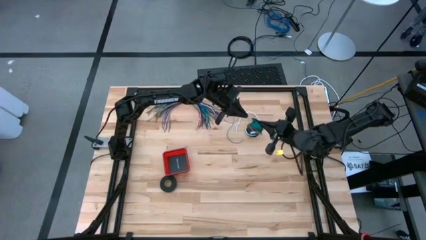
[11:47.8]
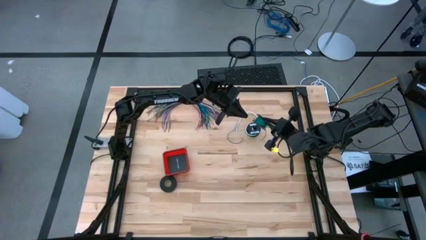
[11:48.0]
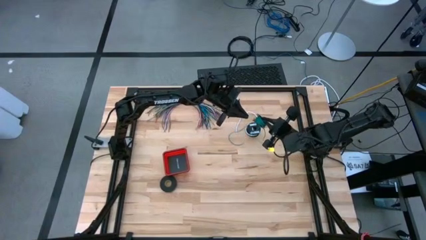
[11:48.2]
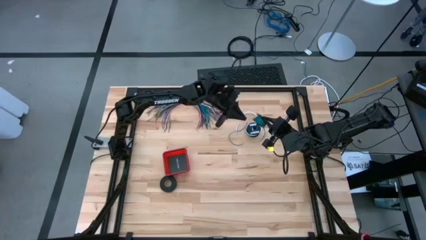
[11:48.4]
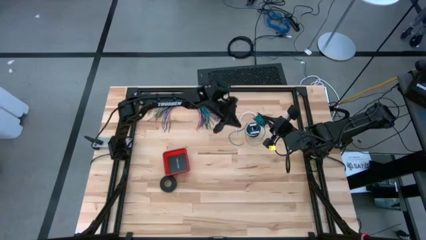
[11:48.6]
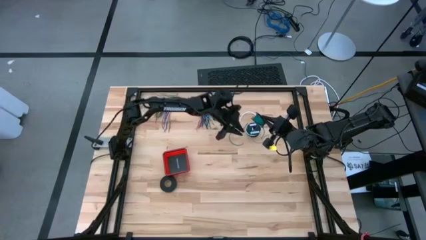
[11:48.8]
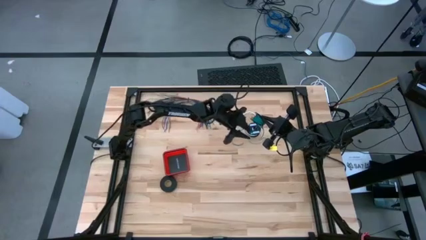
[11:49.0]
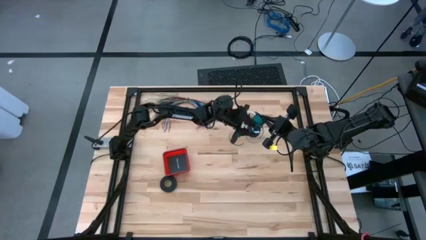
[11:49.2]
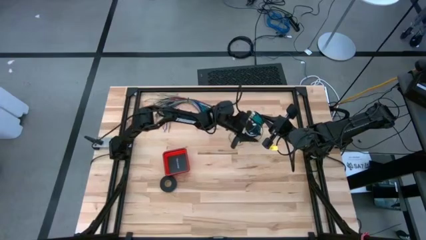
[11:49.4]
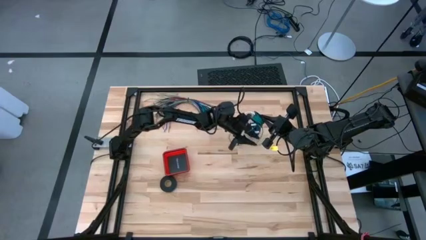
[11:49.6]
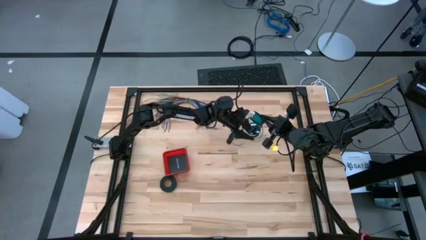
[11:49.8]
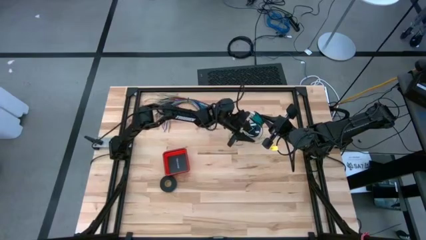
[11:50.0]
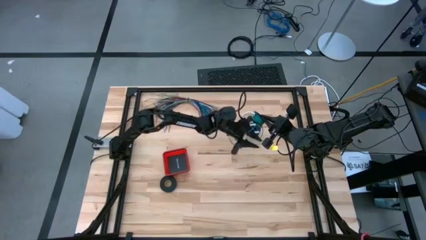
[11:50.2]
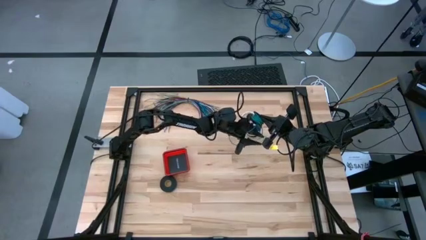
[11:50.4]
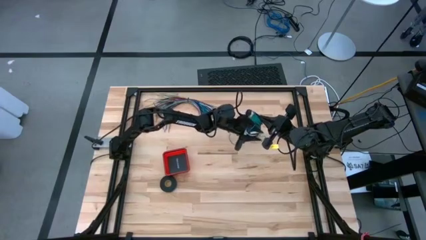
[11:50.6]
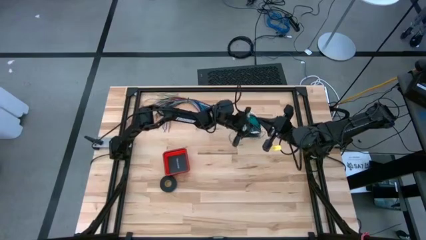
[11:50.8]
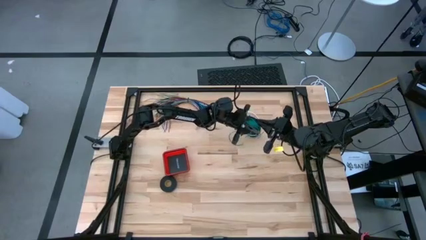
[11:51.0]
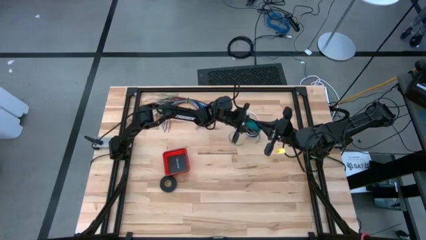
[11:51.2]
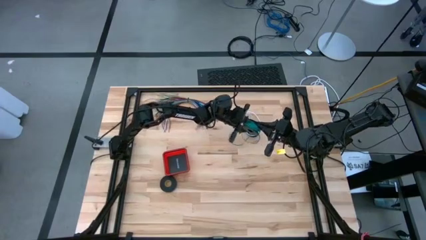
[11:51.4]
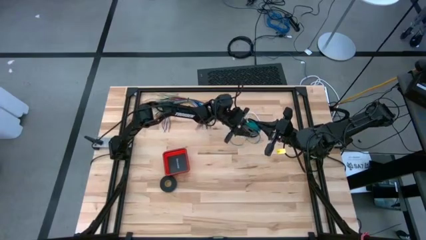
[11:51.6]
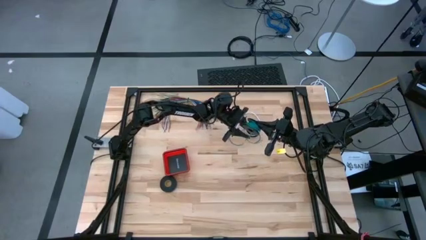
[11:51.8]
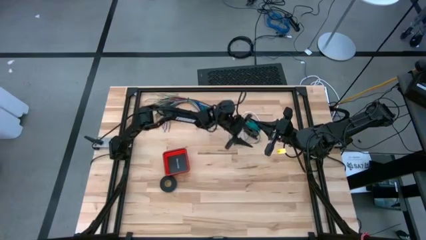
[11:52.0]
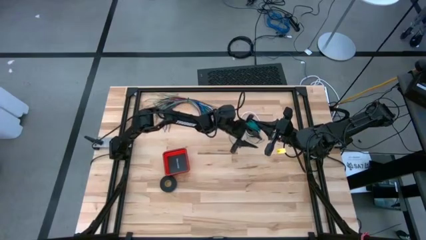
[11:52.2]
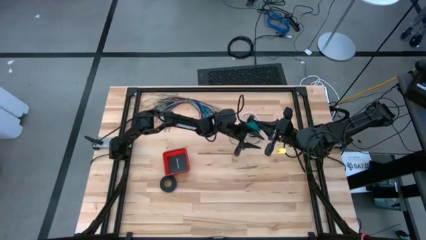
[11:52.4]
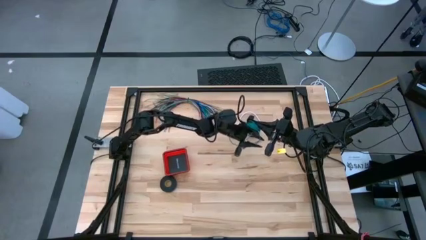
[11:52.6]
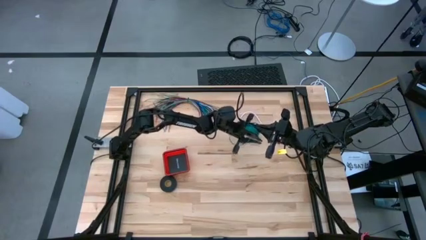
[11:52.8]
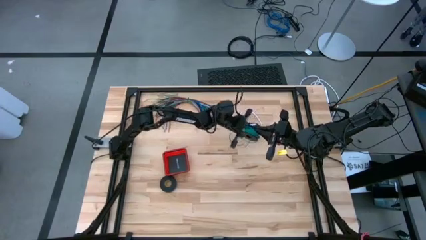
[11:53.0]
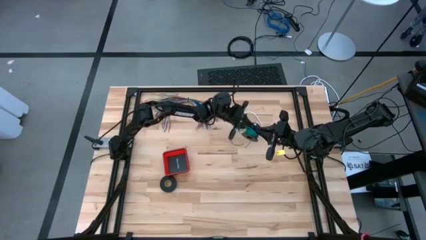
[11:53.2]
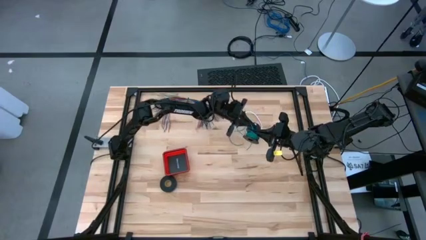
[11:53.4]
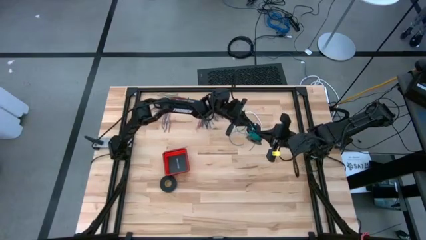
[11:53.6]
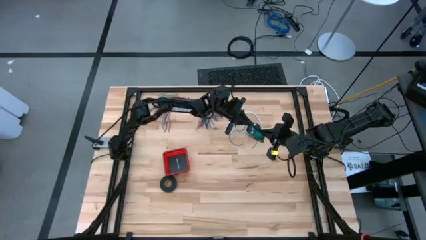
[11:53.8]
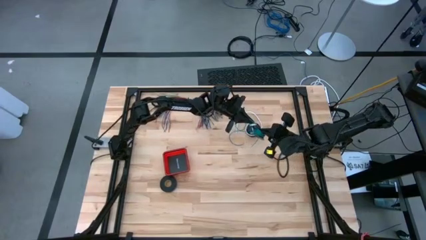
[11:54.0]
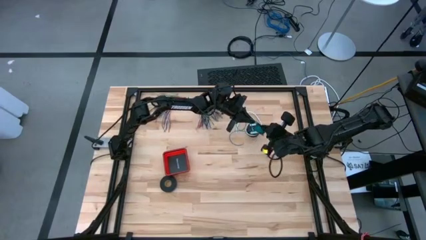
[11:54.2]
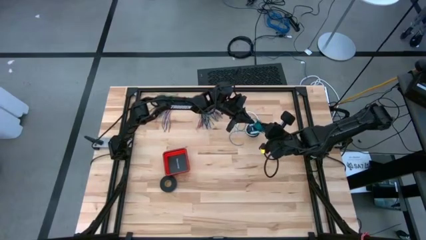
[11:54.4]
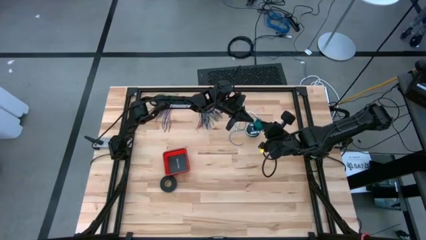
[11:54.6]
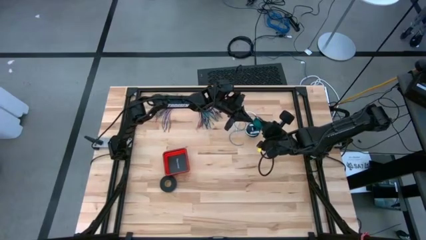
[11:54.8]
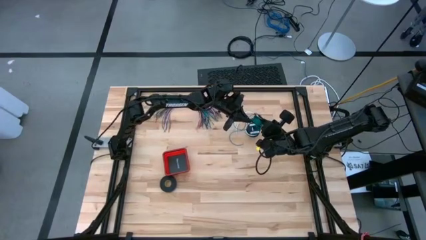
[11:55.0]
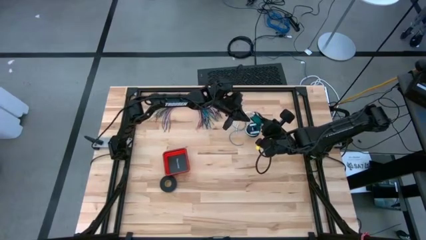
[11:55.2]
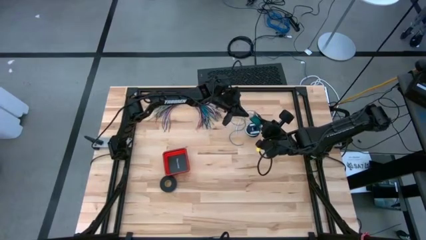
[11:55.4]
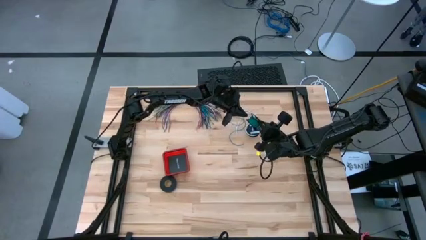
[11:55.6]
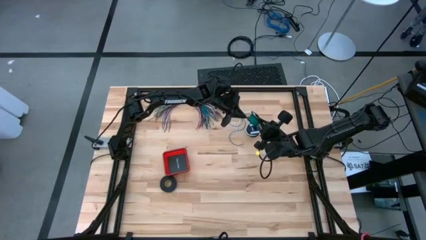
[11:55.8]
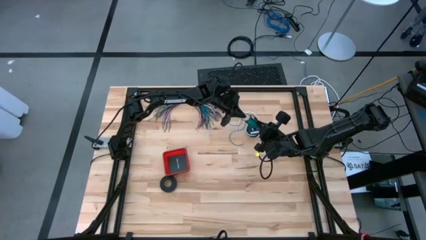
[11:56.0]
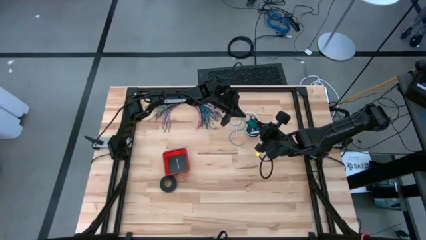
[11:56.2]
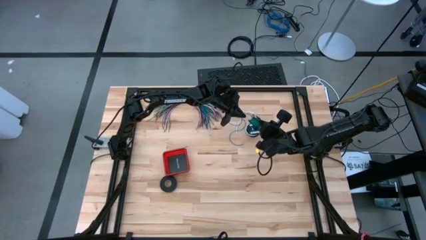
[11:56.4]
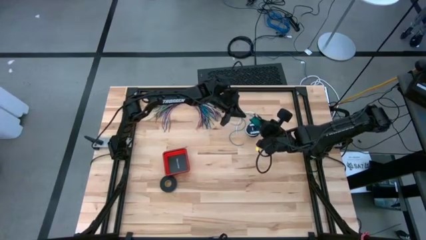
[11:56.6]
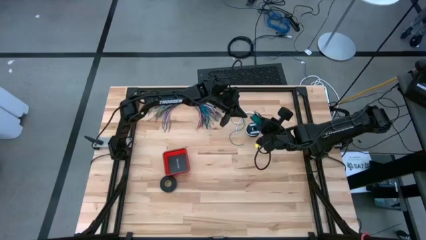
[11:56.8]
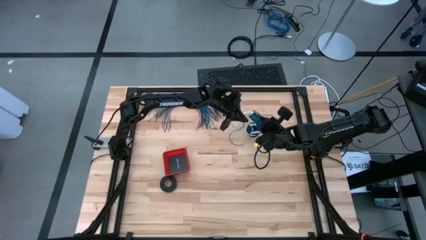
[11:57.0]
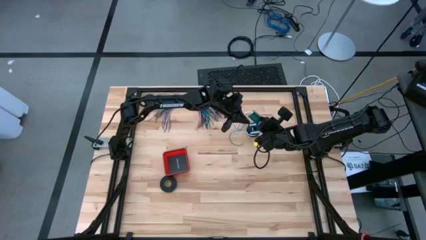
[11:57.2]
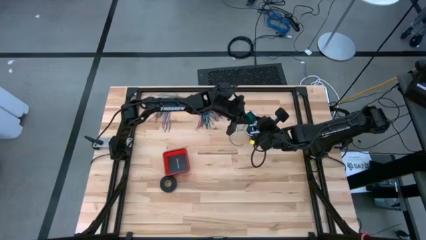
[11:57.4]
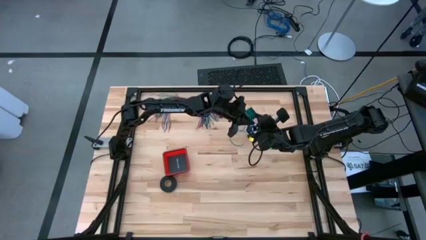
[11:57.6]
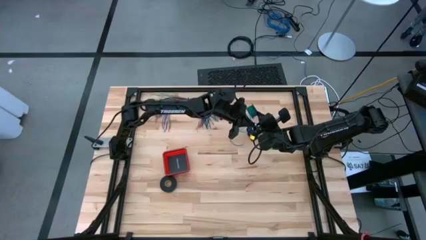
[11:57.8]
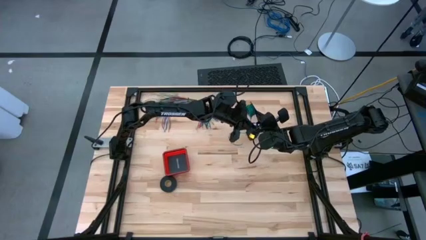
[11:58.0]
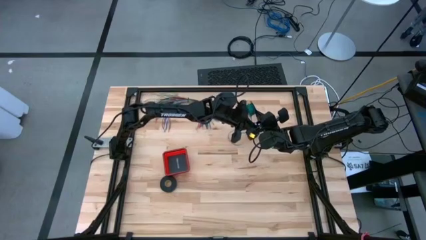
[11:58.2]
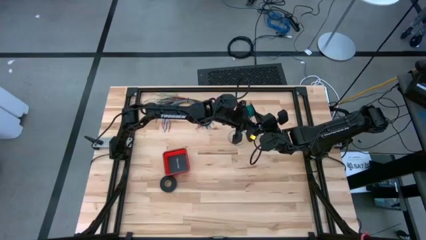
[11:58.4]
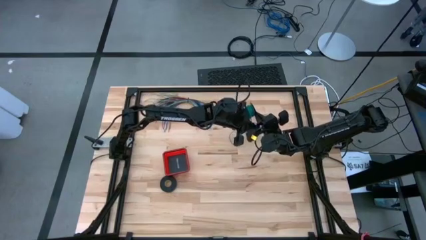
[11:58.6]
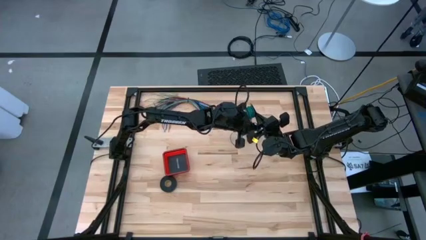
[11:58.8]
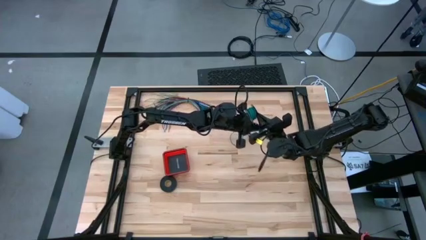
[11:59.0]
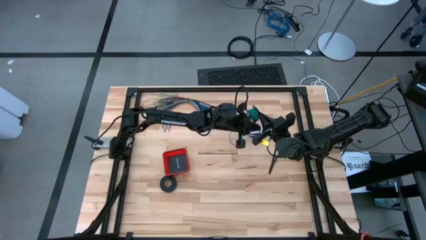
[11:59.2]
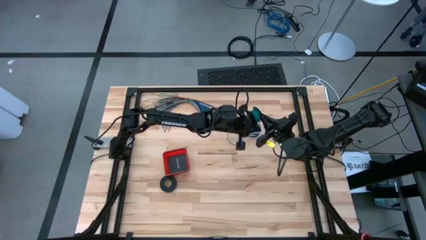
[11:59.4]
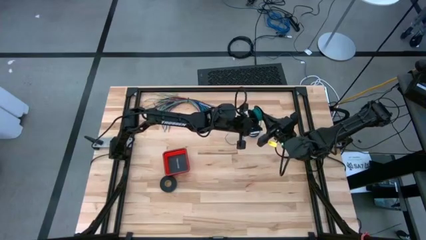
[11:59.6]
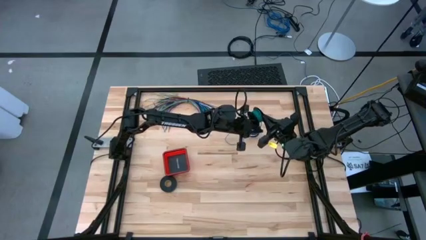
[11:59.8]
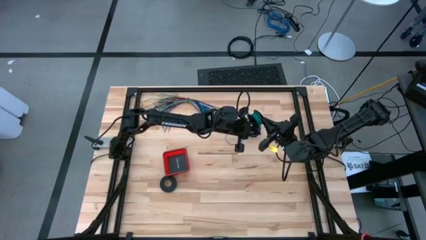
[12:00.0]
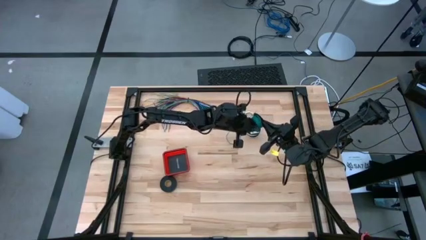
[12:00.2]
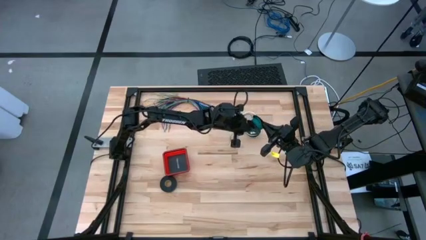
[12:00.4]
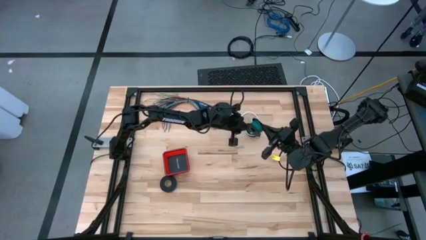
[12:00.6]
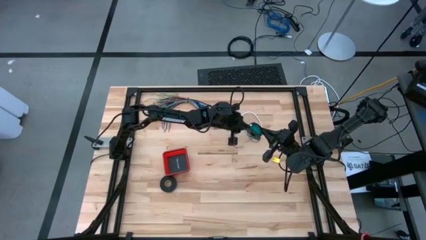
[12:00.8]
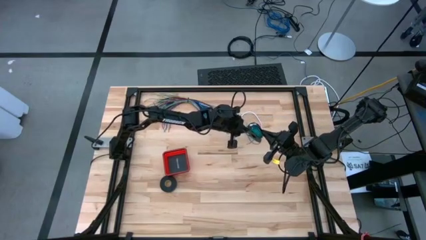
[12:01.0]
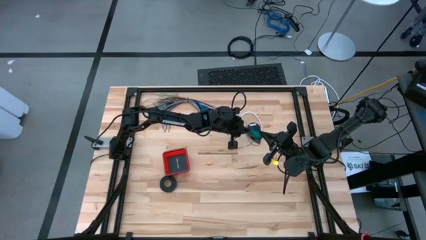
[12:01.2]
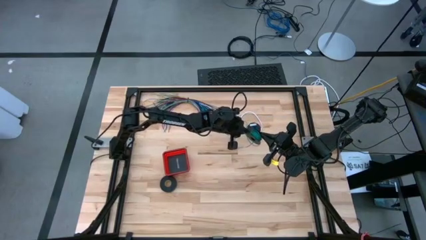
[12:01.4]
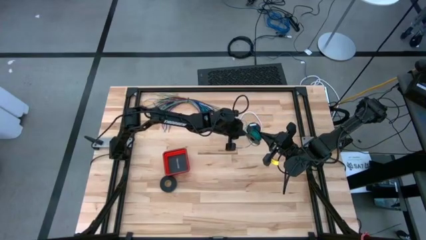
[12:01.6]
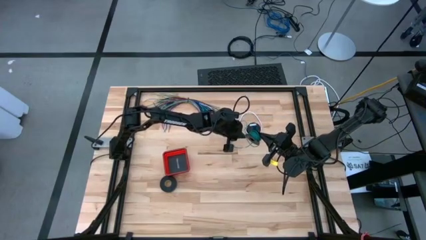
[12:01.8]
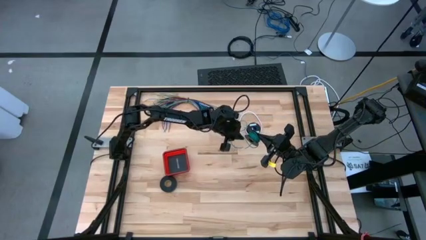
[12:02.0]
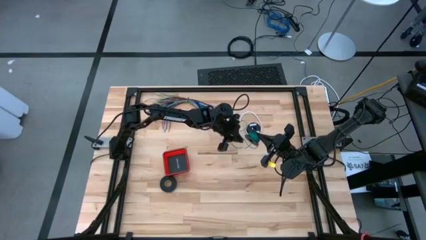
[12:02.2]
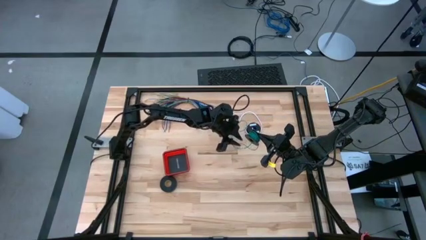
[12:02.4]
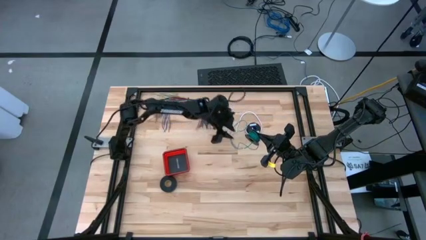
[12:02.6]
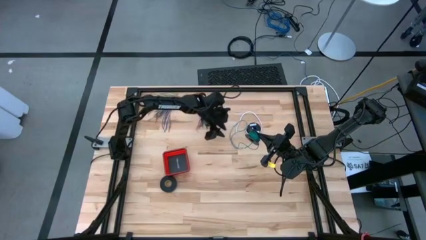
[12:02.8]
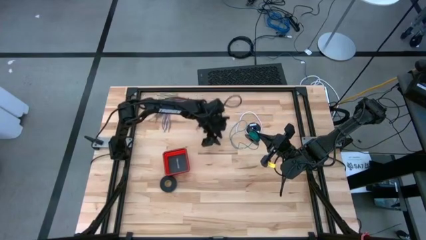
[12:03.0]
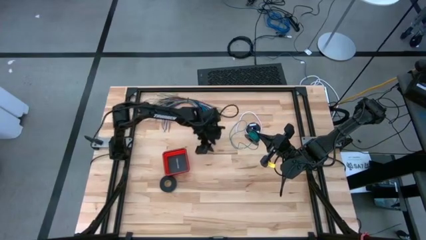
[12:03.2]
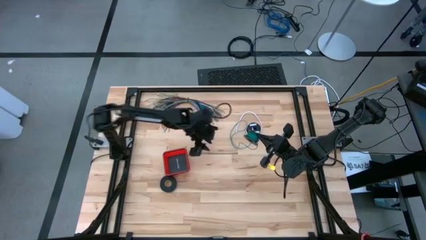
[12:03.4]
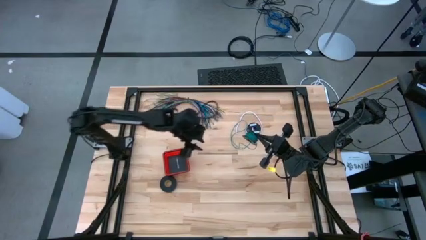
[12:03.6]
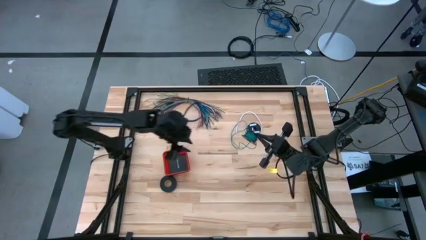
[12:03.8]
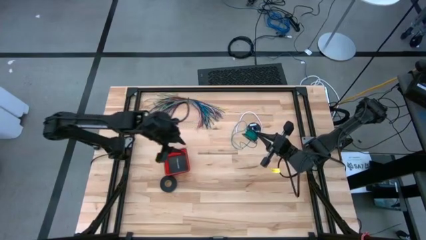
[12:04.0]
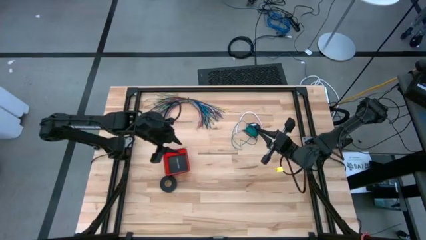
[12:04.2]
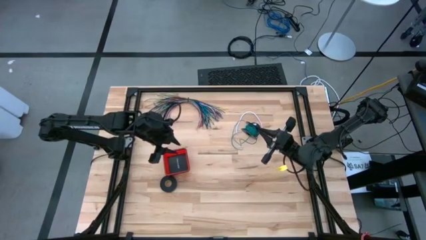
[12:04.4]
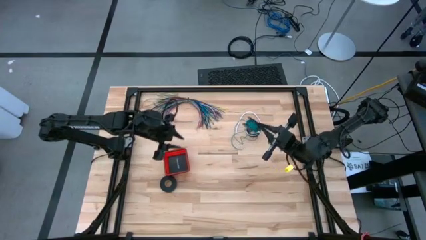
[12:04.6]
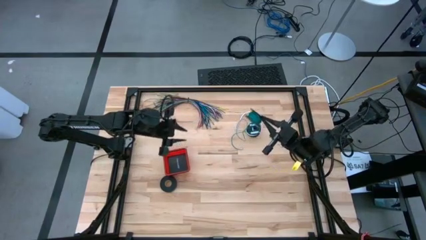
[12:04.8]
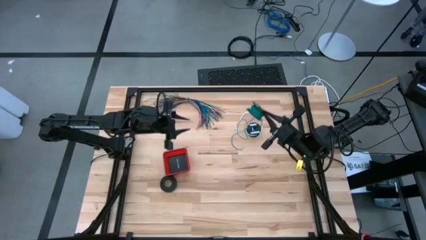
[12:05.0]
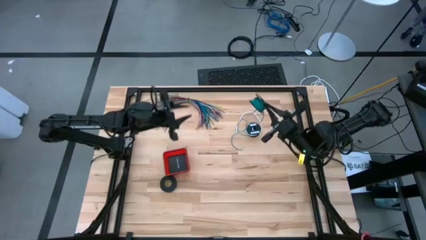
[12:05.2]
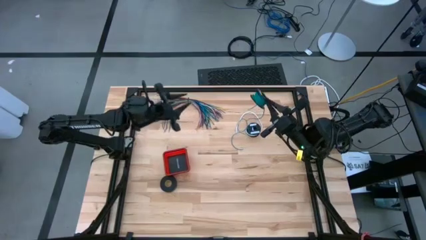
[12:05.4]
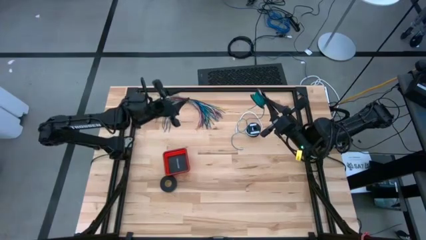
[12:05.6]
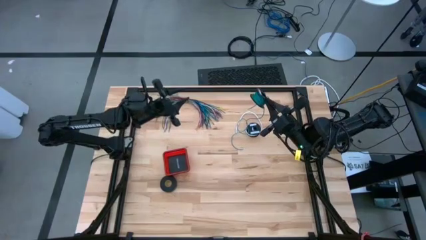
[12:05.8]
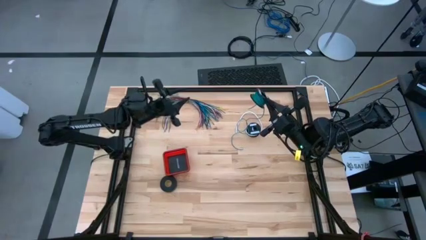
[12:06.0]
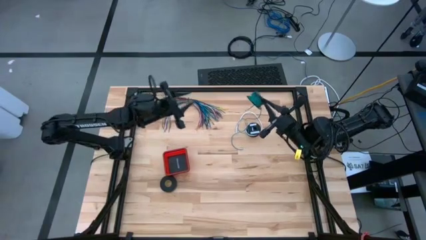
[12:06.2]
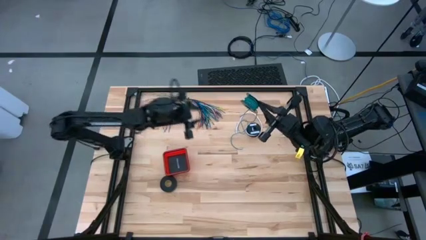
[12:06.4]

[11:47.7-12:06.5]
Task: Coil cords
Coil the green wire onto the spool
